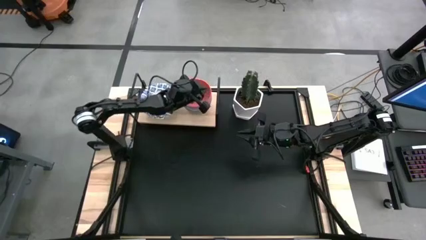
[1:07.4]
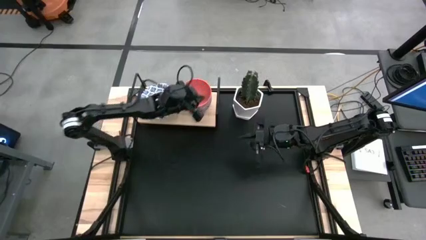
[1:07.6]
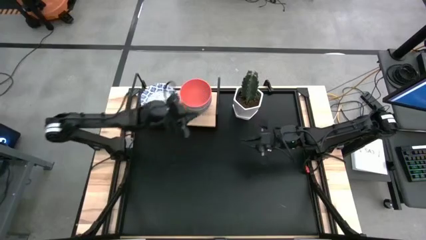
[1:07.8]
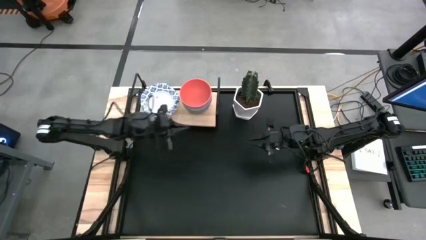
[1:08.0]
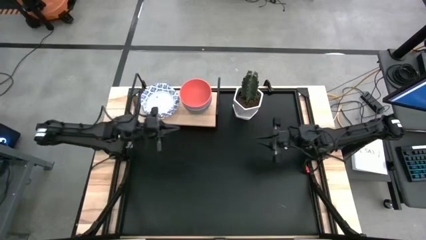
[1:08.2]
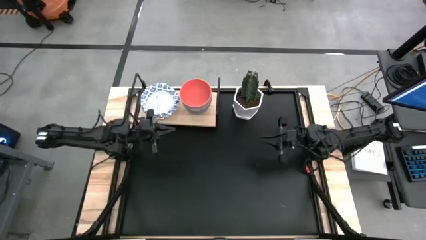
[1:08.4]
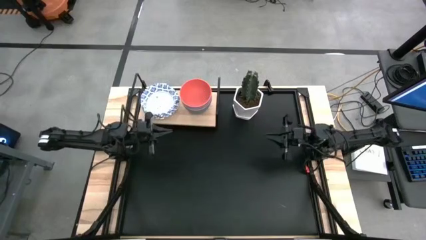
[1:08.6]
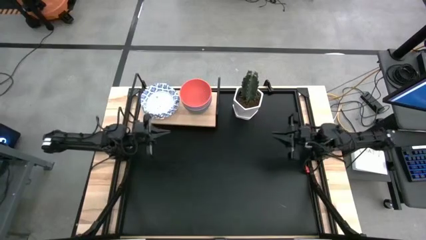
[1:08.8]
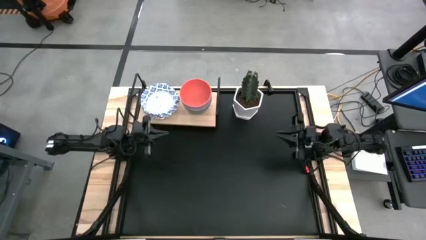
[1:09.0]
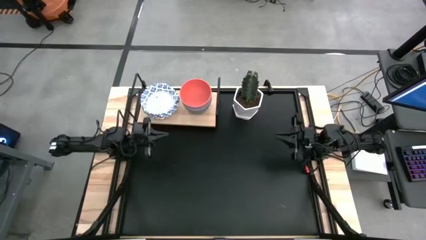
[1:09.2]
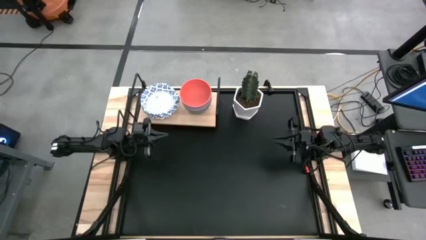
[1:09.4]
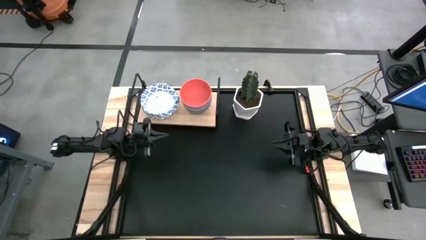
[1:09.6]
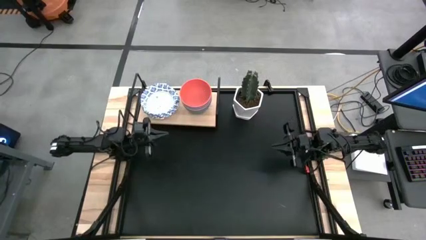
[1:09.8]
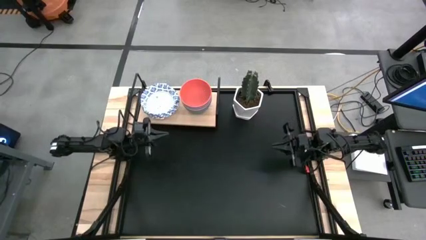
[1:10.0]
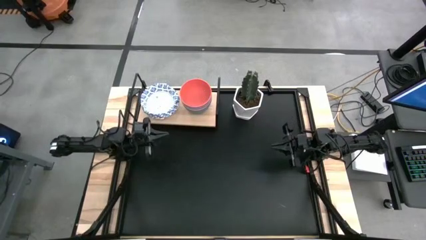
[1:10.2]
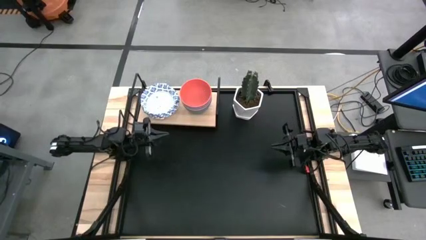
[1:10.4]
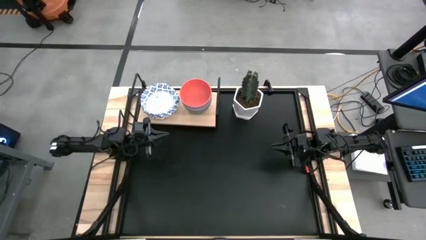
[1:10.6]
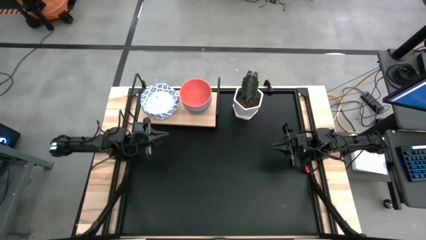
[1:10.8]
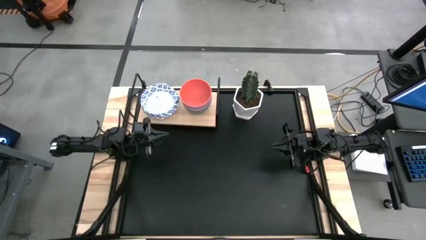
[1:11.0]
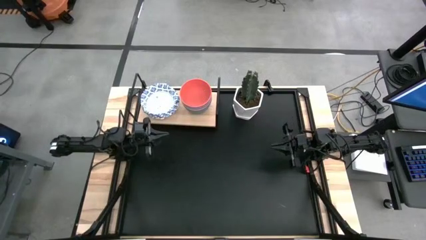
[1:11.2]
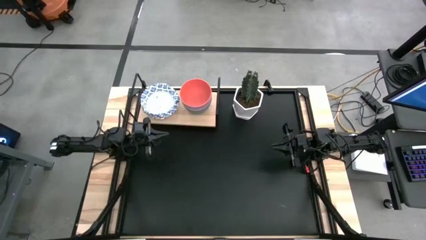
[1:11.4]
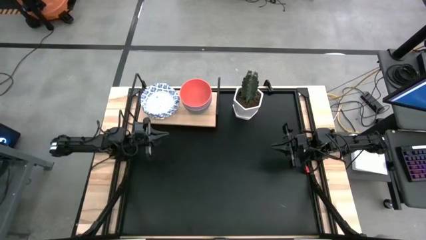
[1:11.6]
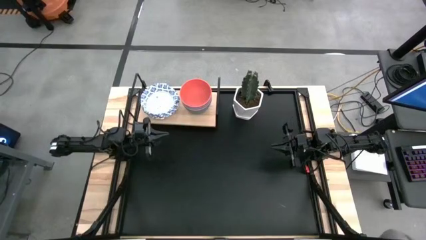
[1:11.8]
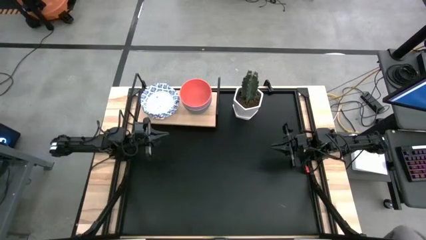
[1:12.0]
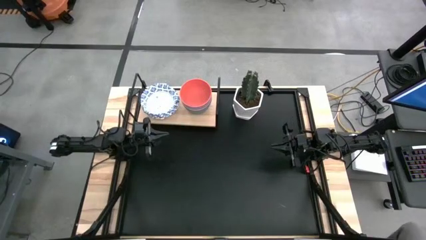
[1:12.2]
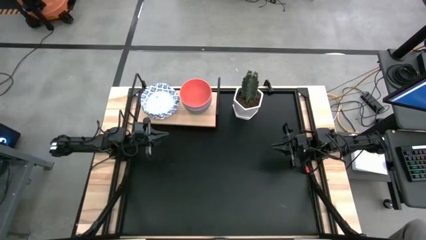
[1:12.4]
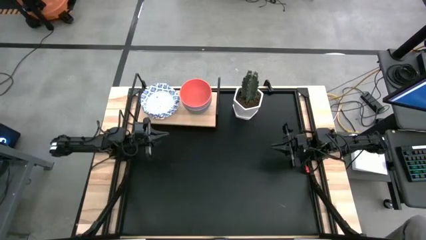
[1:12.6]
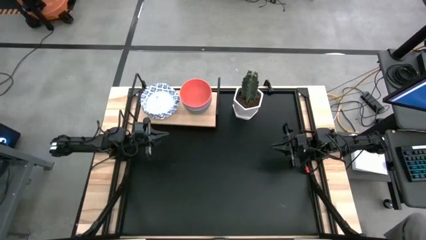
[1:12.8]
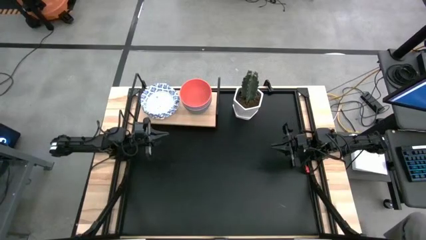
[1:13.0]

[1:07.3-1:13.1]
Task: Place and stack bowls onto a shelf
Return to Home Position

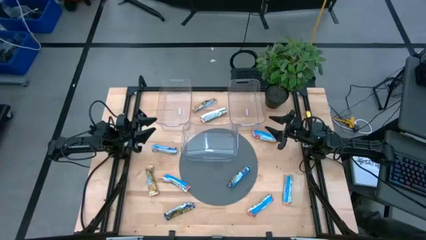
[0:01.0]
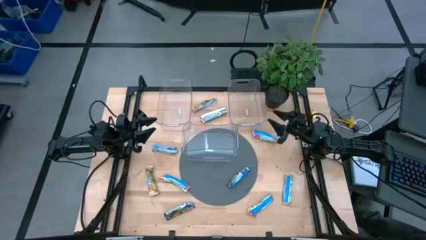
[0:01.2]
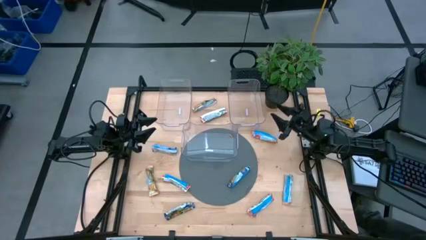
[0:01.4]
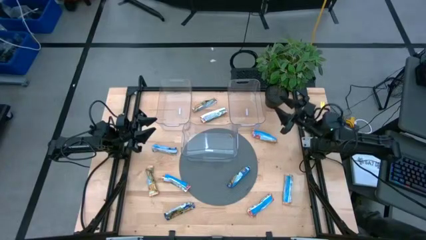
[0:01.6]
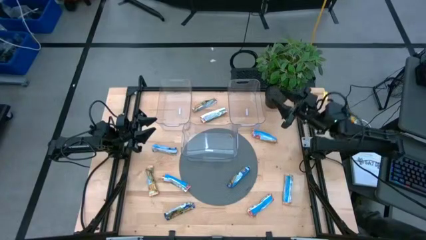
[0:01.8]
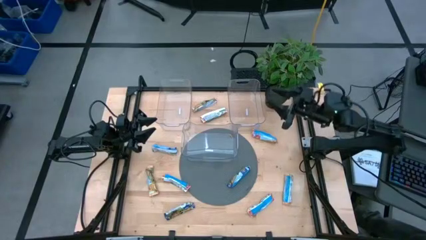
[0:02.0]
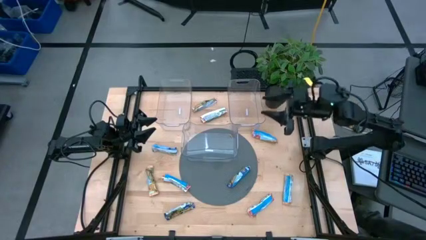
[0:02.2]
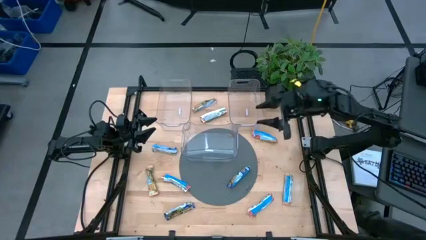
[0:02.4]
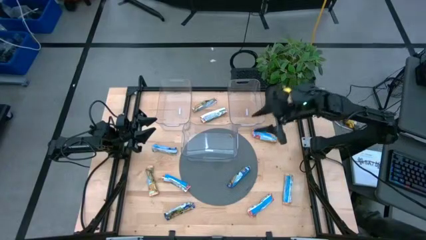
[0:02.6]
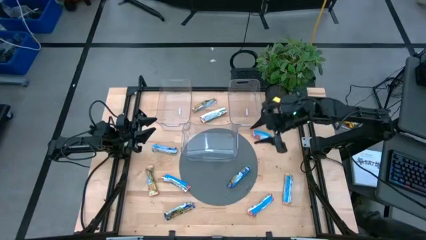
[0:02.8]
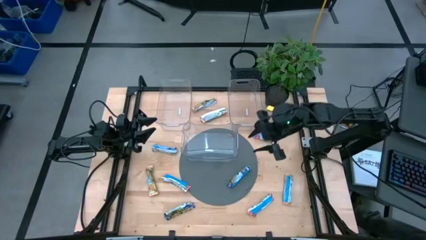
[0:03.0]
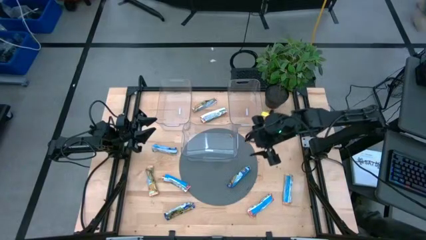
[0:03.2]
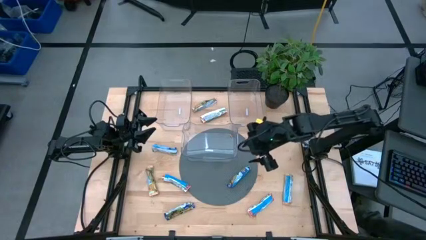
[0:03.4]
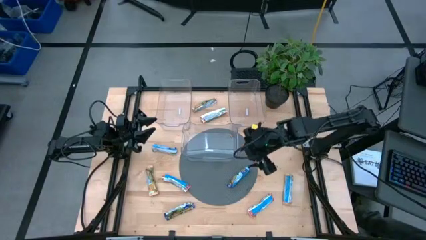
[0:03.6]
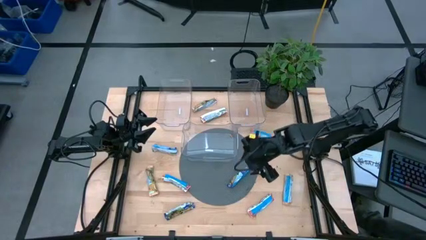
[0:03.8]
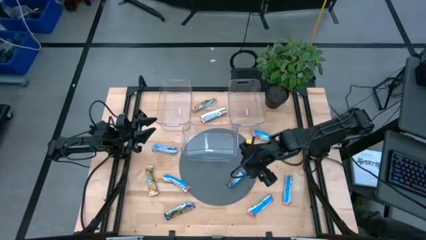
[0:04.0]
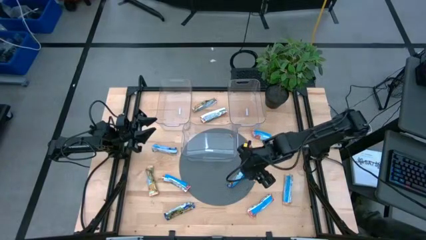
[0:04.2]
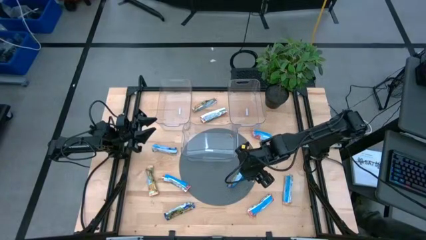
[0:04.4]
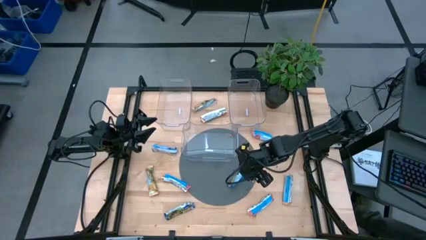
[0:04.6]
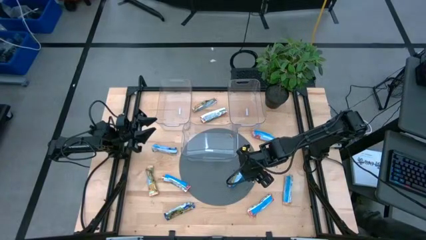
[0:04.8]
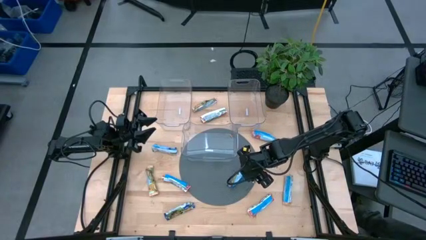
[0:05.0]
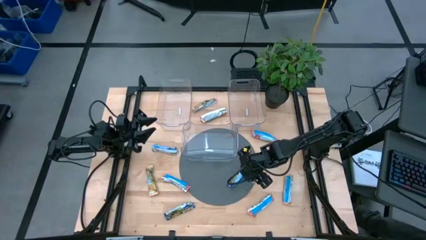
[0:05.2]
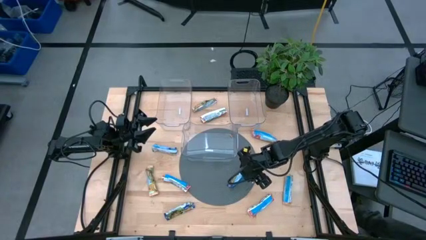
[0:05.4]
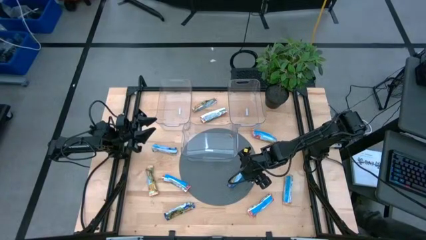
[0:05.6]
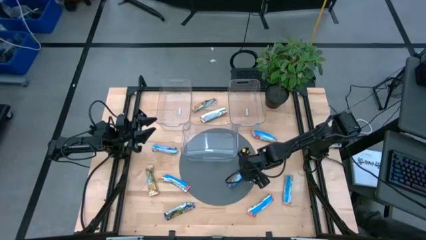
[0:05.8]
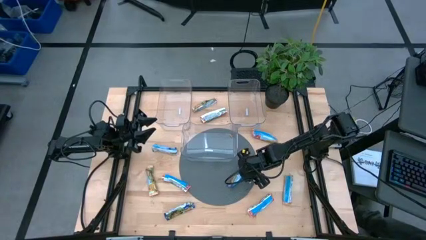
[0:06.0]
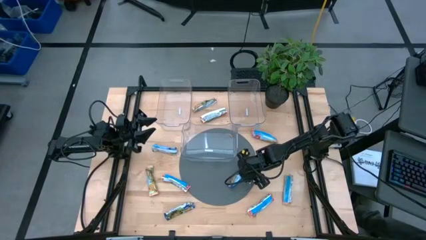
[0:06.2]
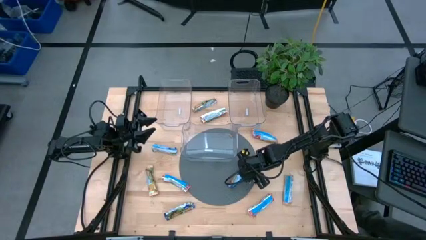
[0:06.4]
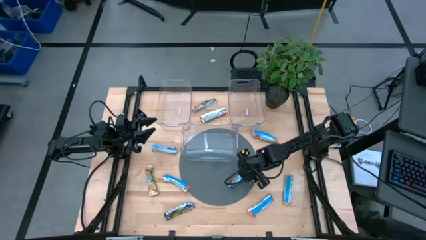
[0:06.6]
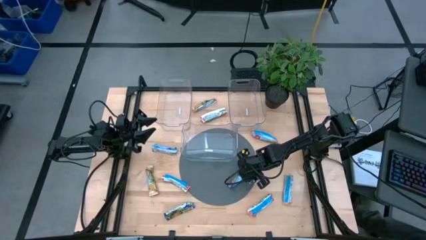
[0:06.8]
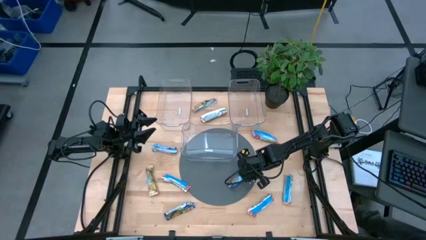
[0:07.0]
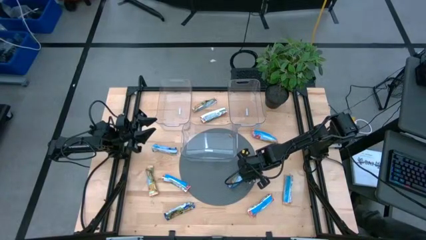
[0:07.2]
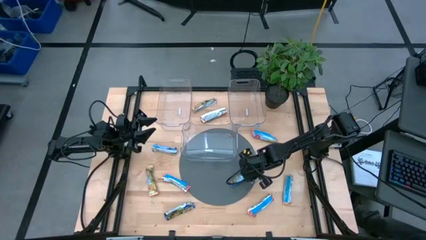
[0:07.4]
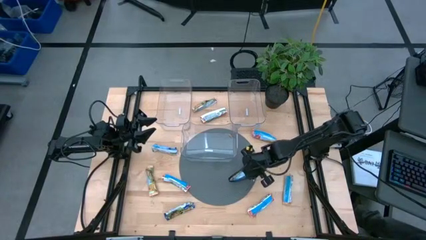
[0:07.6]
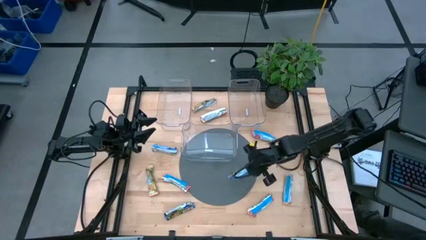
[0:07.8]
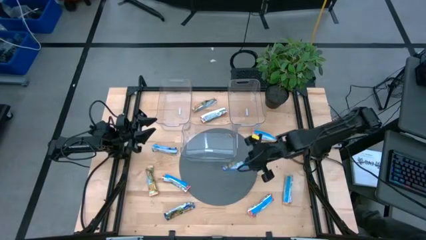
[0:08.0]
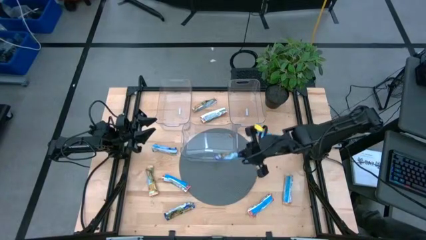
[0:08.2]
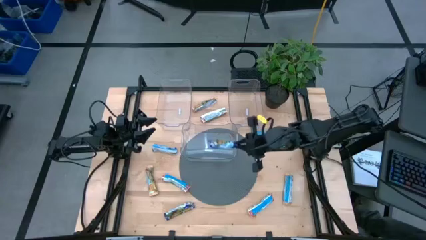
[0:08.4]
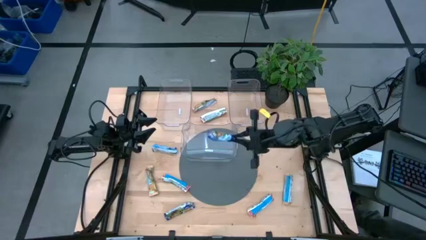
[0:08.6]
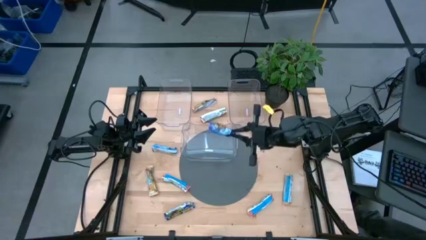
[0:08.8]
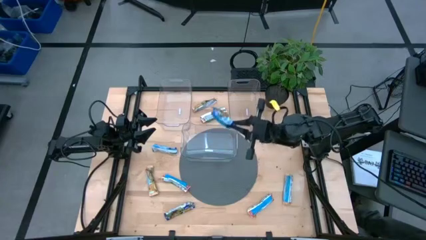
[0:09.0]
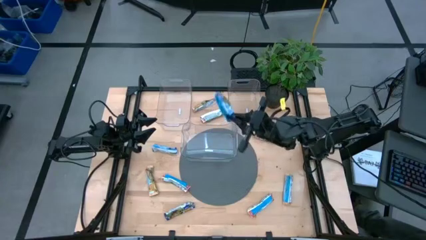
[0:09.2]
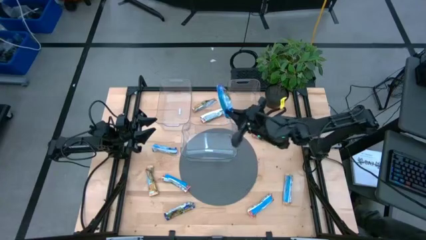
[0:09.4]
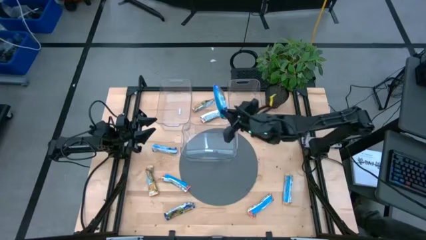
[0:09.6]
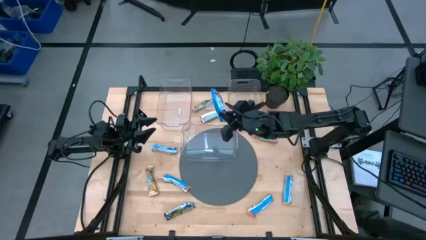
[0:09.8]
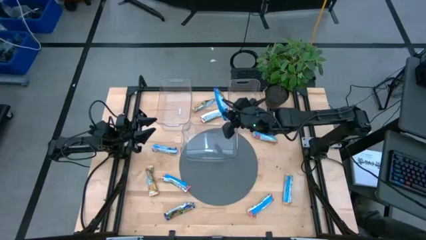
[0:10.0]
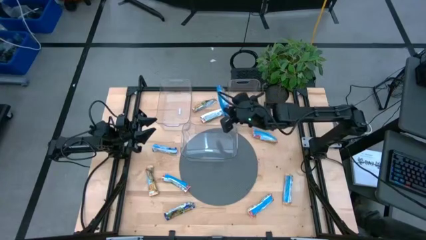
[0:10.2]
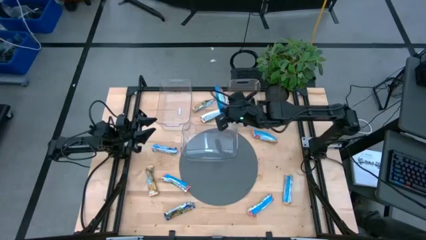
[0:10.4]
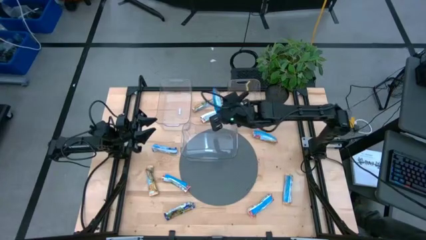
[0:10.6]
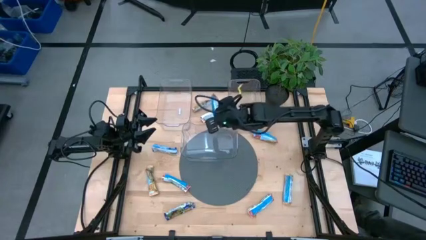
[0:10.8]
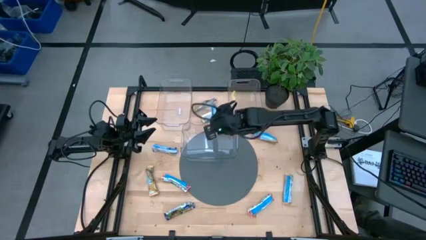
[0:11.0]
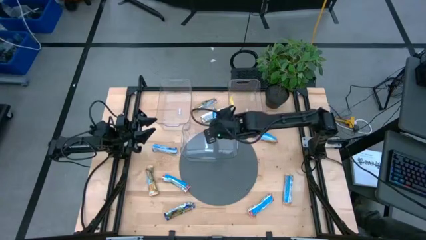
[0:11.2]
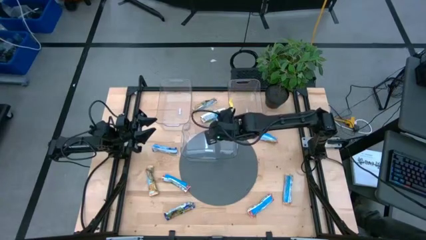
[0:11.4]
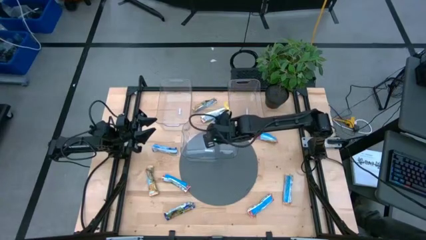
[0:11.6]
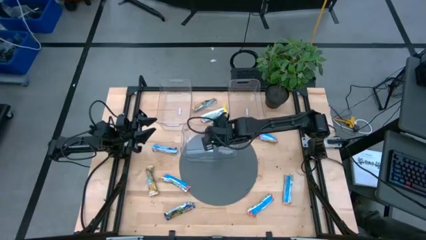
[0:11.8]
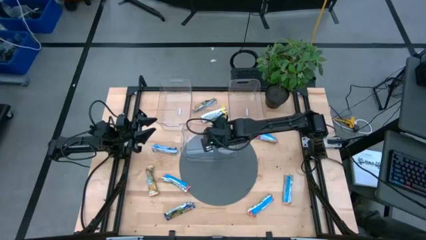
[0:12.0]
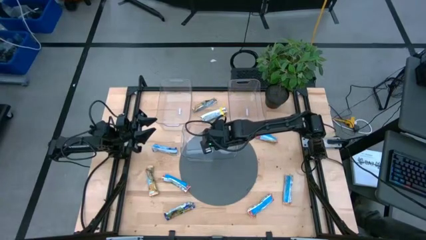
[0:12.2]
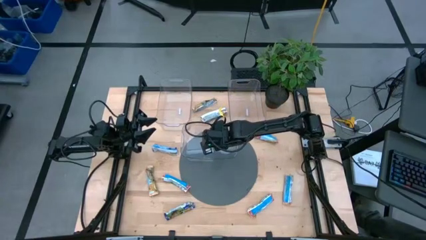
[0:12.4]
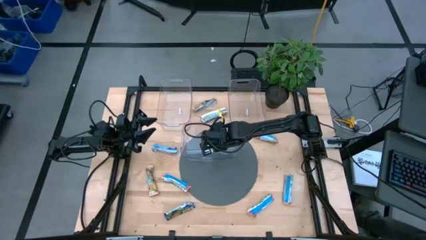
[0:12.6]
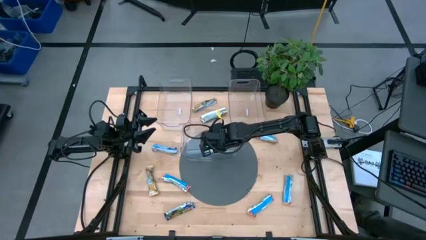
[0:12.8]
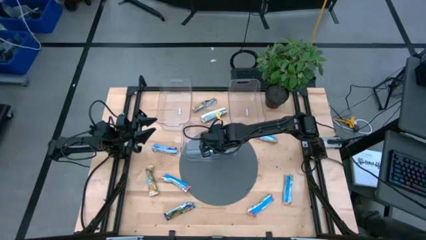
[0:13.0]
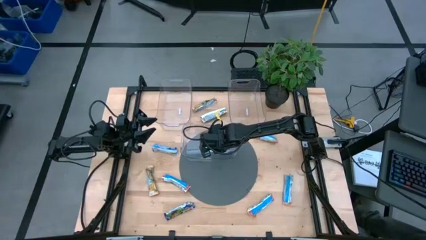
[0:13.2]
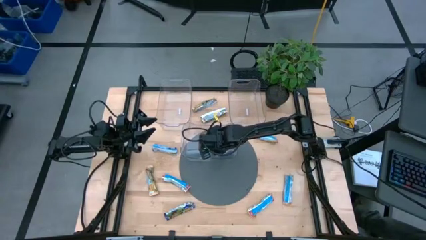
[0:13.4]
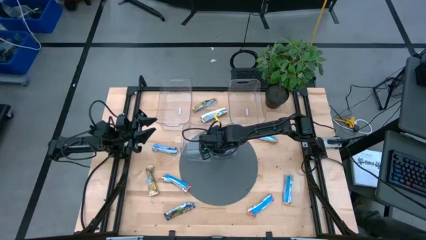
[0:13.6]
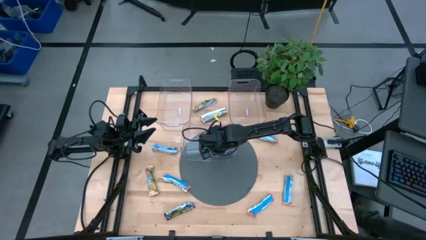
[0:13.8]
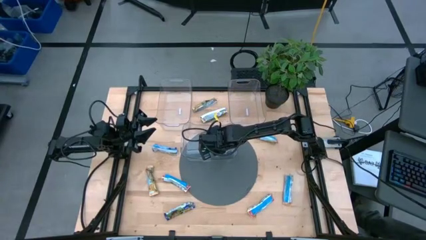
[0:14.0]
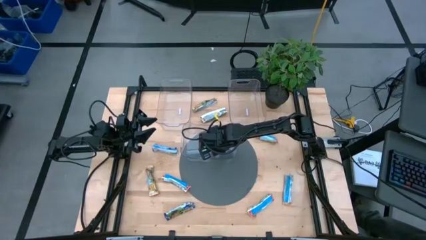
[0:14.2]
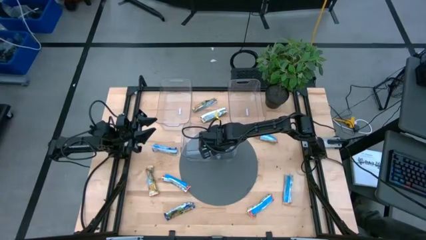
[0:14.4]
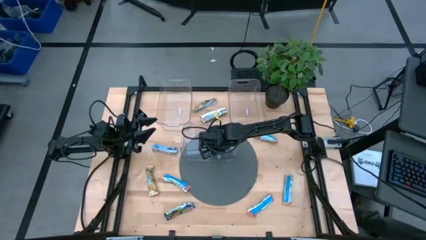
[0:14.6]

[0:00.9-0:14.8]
Task: Pick and place Granola Bars by type
Put the blue granola bar into the bottom transparent bin
